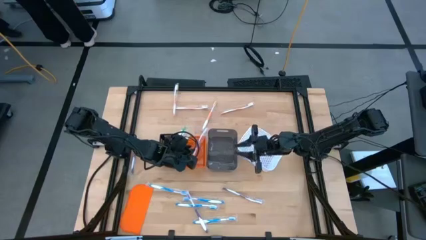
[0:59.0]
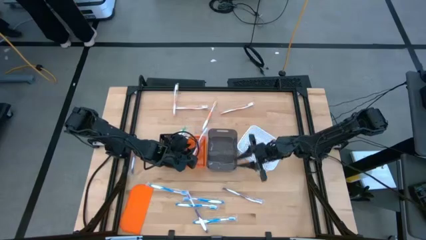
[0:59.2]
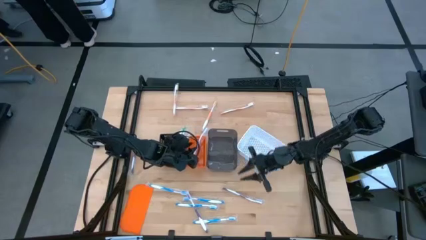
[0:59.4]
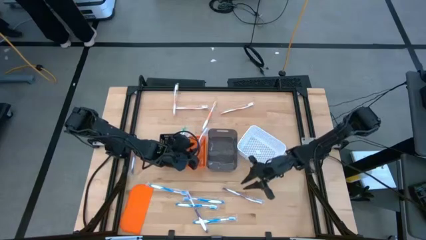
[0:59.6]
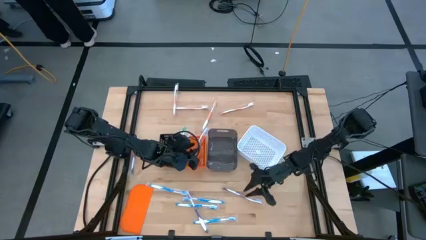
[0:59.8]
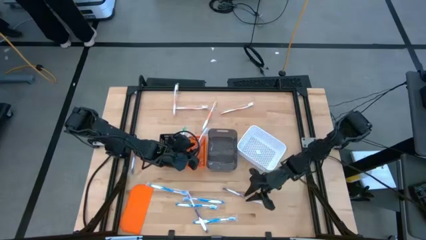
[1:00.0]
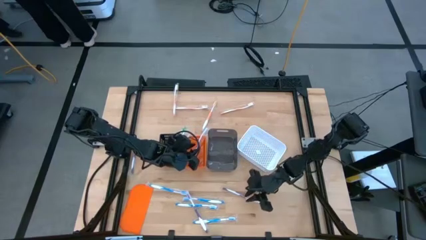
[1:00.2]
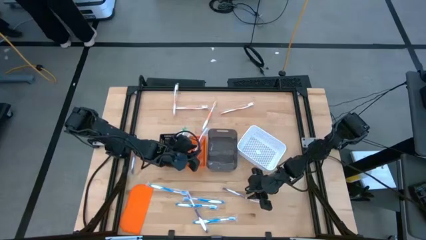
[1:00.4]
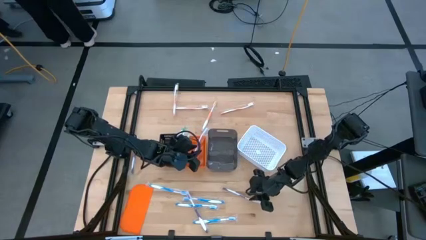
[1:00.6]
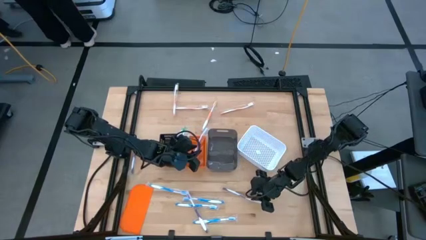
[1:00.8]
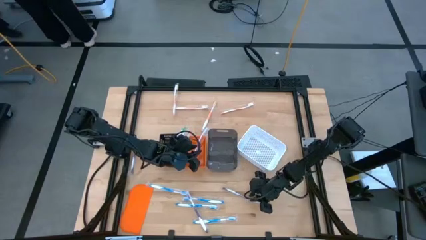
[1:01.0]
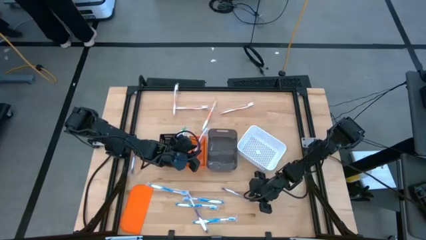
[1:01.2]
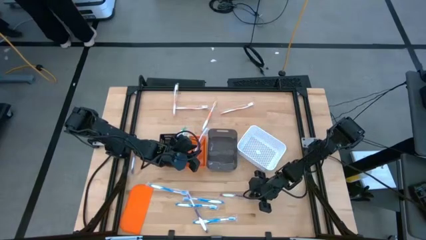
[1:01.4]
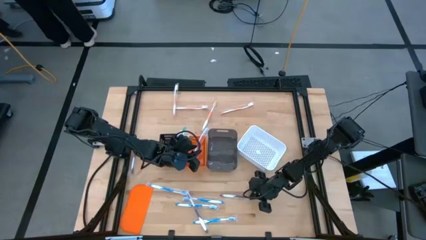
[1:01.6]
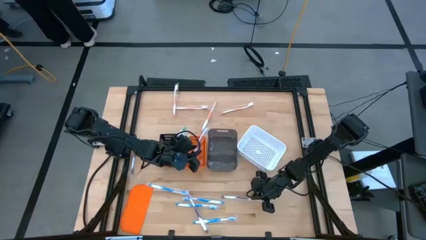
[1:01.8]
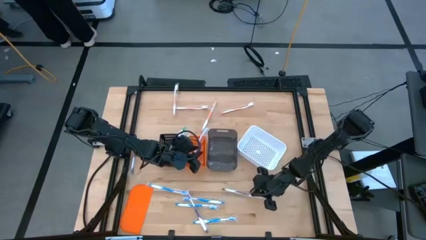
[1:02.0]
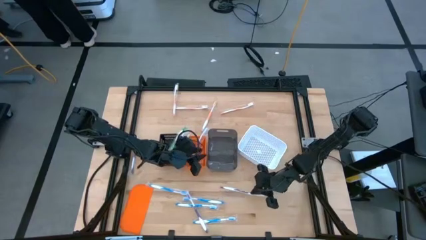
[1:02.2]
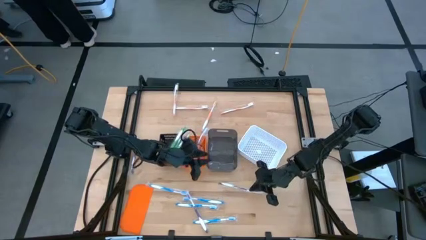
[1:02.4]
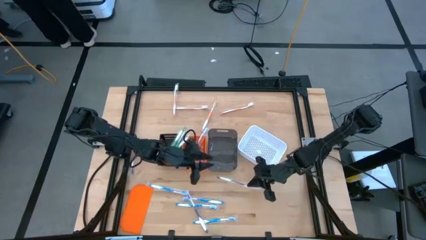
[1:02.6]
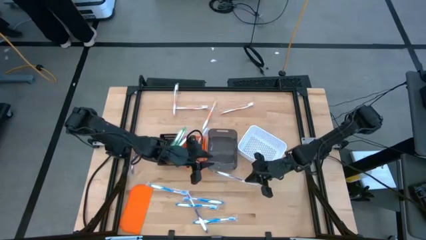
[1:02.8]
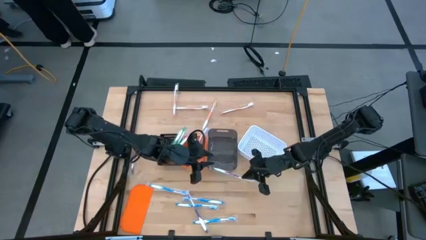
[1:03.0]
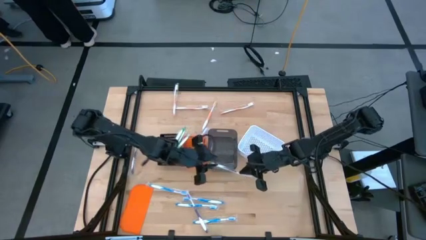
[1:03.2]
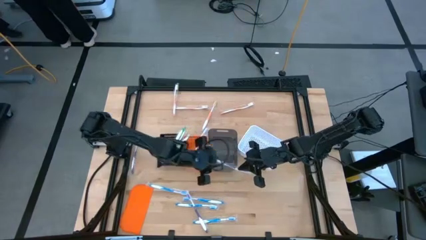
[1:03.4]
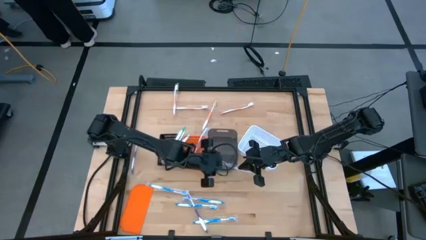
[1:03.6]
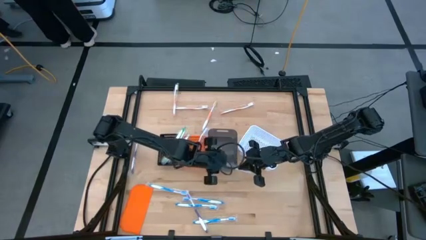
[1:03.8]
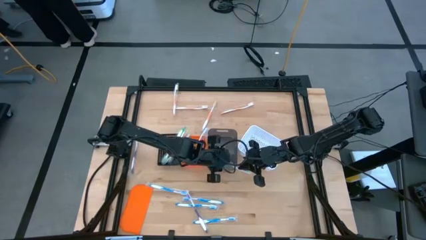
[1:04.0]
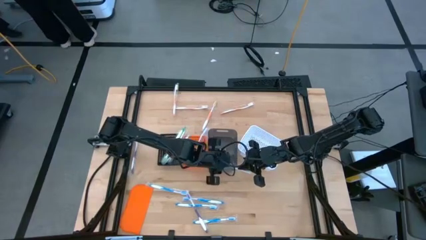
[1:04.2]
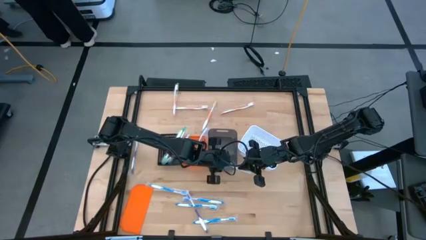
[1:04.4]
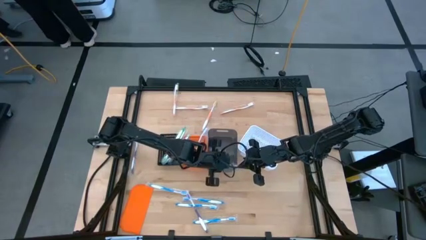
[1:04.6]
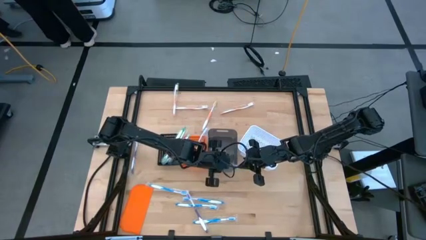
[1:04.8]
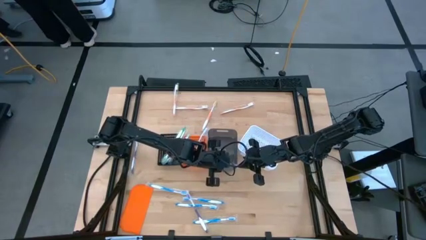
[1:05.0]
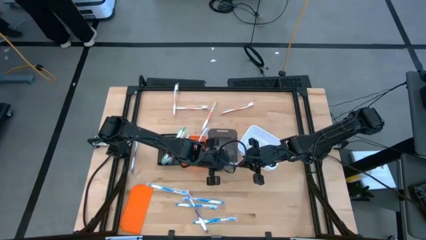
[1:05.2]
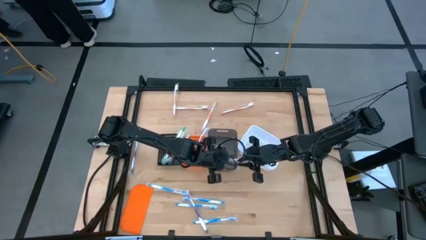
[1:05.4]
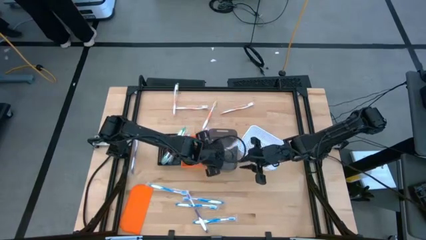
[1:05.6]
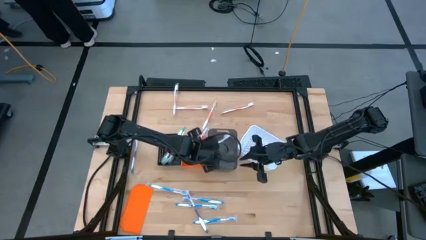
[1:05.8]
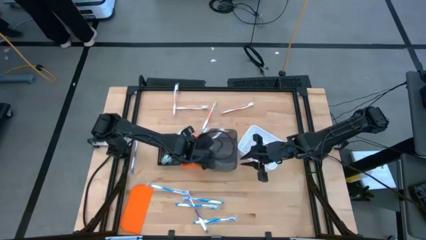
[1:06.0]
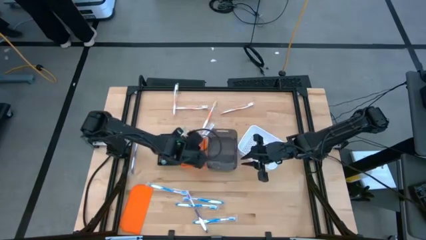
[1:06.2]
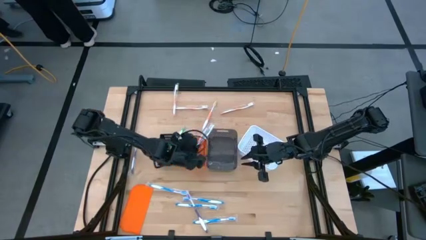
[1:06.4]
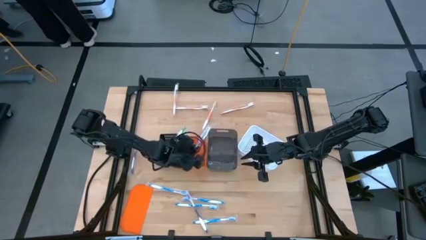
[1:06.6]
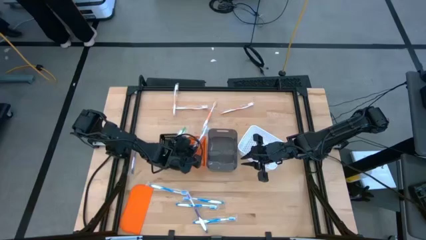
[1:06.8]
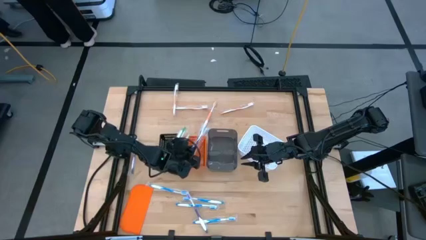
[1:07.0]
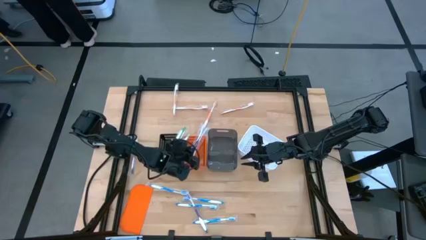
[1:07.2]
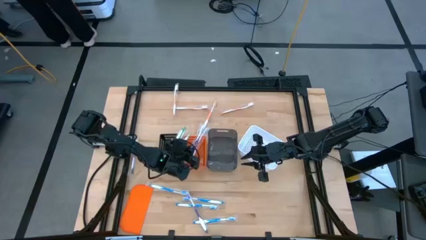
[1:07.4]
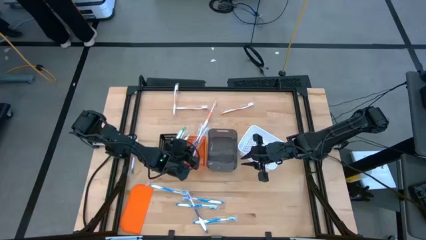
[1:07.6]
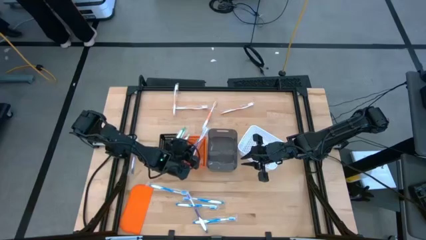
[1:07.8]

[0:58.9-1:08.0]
Task: Pick & Place Toothbrushes
Put the violet toothbrush into the orange bin

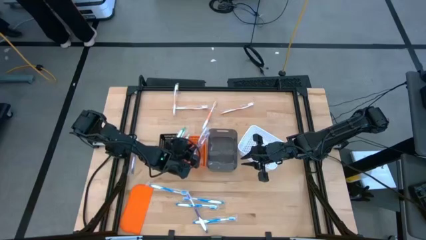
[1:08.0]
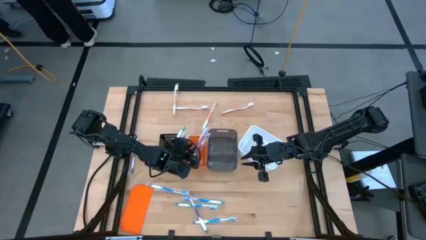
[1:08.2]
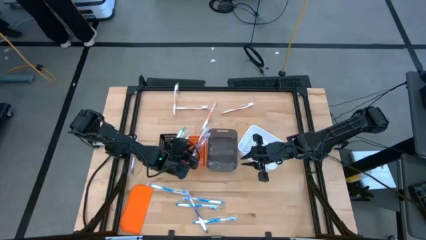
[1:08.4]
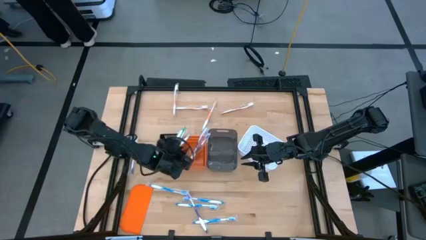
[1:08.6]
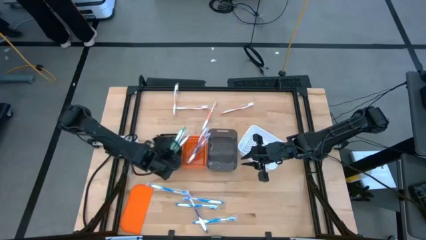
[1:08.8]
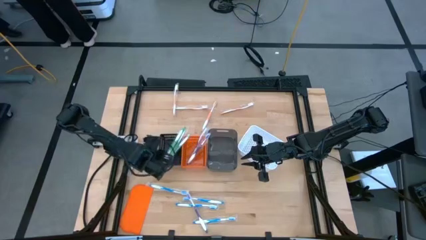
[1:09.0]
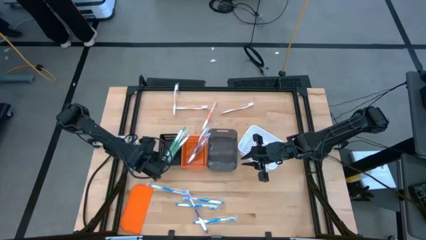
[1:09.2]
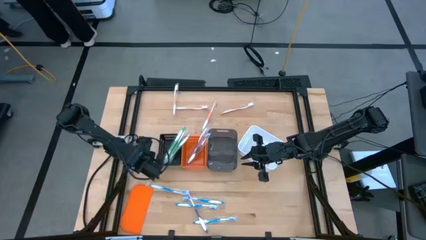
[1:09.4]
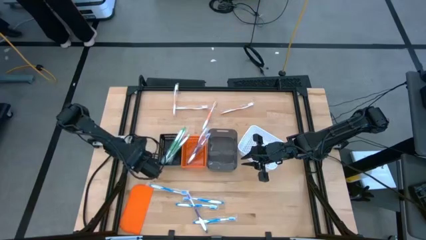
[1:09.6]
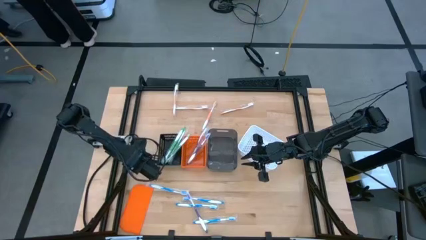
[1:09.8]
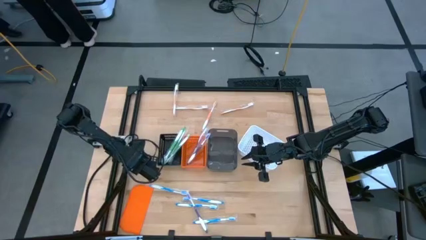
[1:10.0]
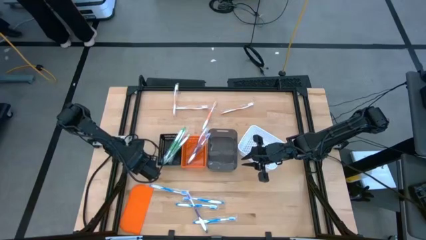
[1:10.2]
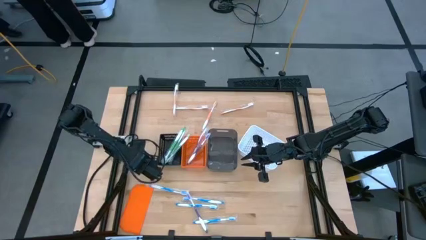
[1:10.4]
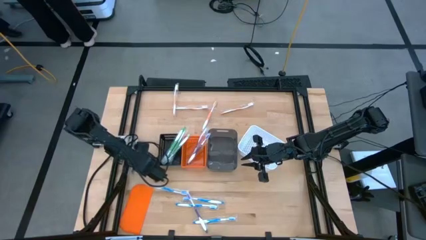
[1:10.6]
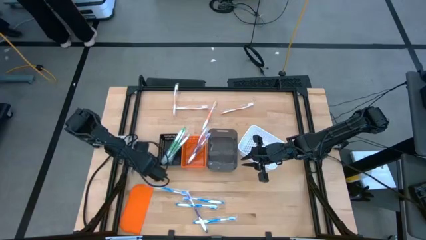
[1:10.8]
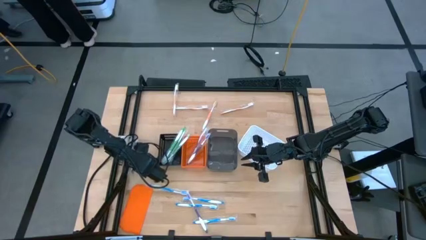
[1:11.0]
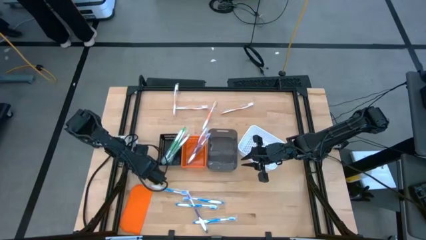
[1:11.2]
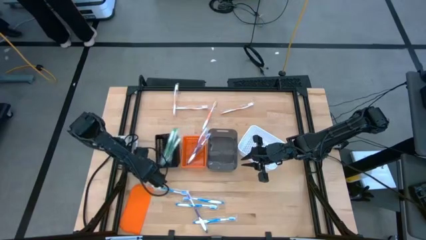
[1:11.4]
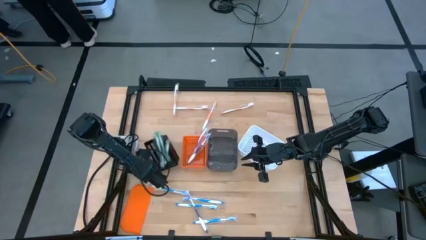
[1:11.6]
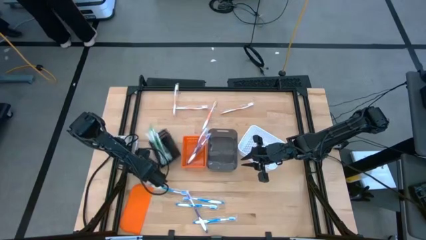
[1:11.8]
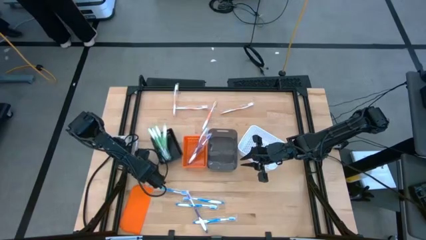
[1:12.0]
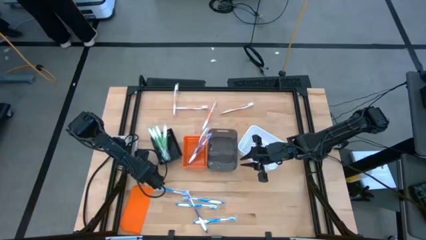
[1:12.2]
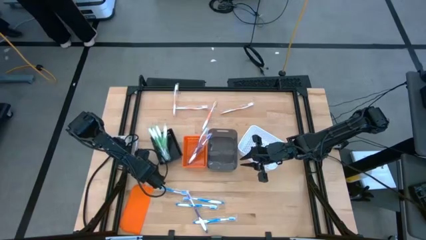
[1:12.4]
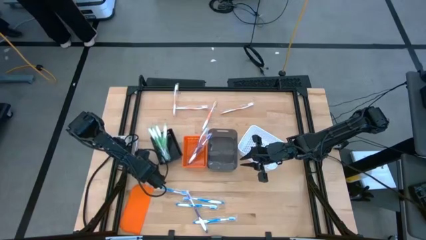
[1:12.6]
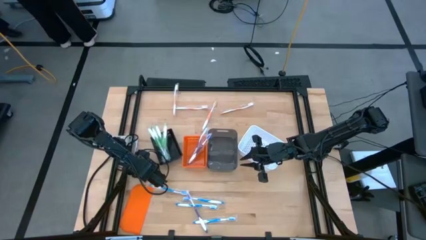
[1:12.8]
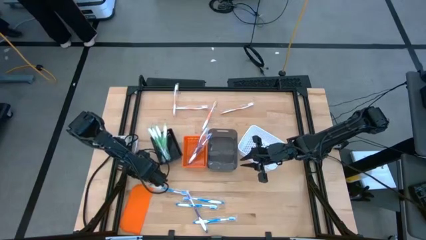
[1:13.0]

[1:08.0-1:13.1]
Put the violet toothbrush into the orange bin

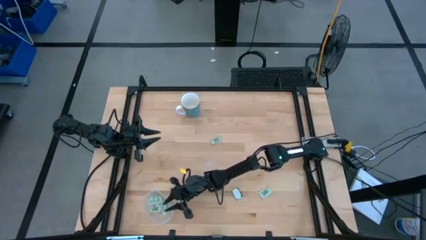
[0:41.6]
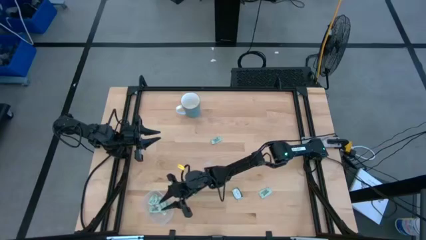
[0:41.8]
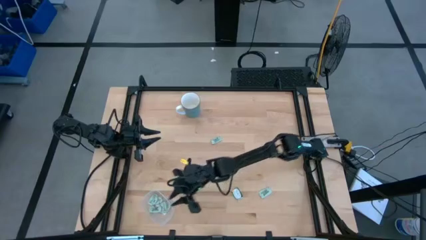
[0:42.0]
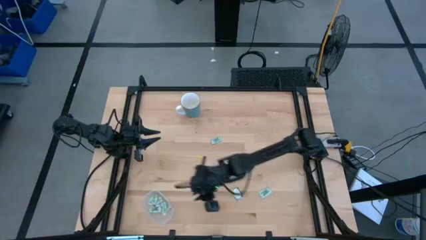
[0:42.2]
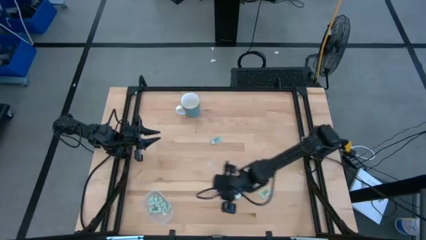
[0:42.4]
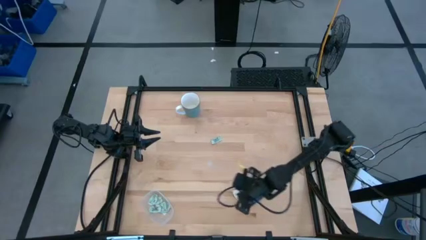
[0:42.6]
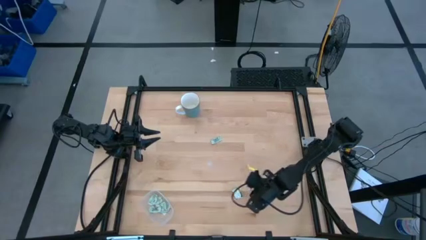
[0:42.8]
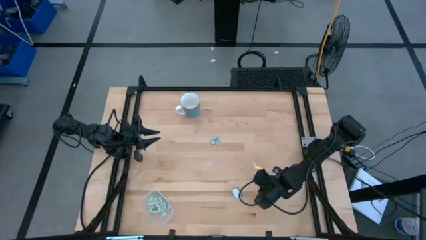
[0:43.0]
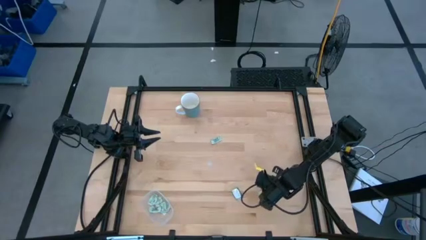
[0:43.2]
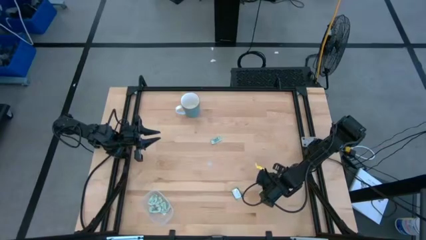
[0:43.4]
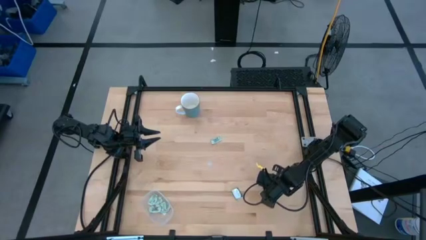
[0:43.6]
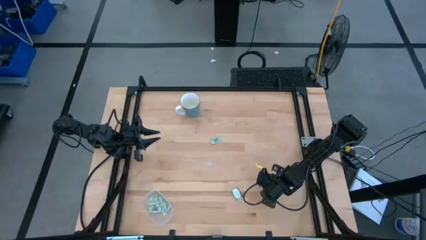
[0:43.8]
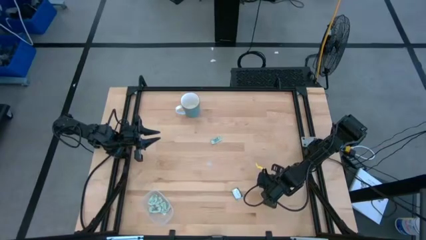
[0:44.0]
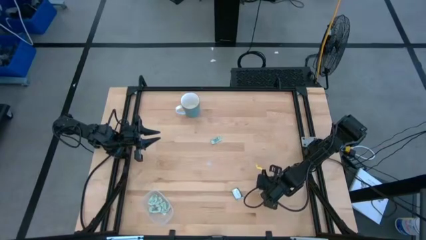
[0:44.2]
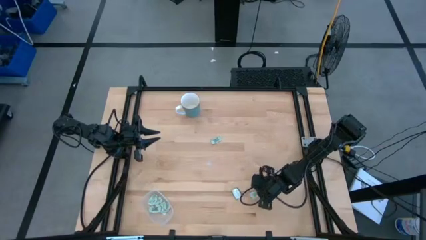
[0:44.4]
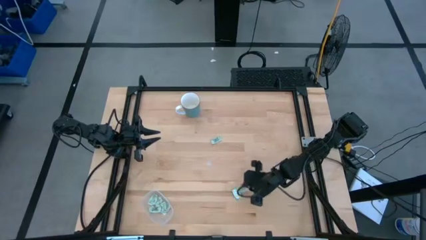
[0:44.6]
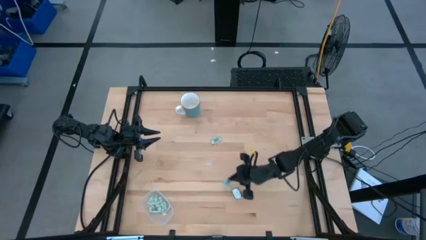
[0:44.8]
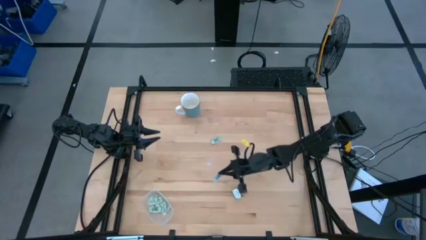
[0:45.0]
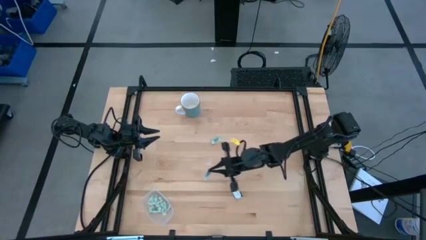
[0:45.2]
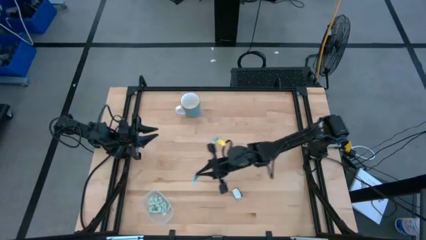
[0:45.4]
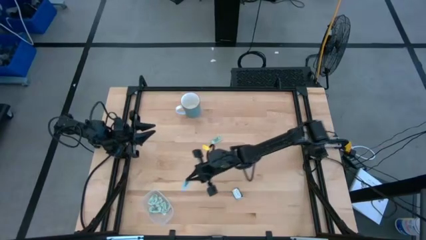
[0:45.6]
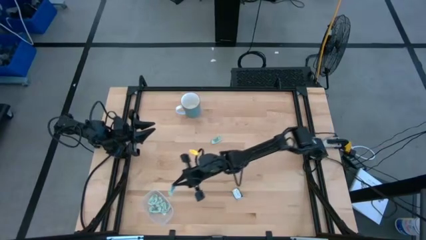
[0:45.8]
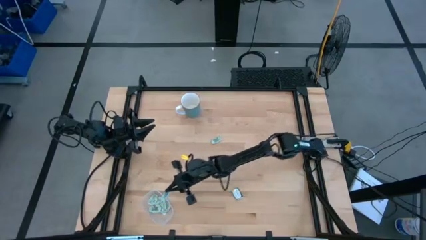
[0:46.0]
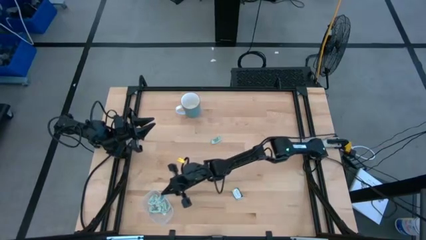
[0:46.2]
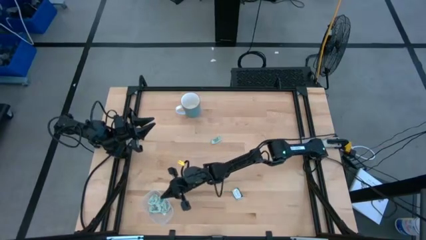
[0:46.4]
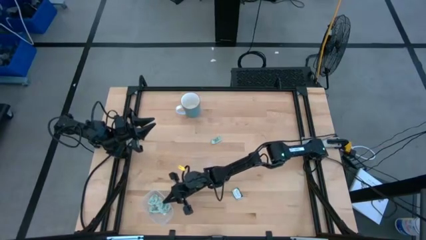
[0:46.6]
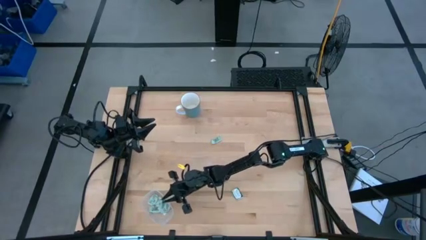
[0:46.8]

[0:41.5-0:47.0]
Task: Pick and place Stevia / Truvia into bins
Put the stevia packet into the transparent container
